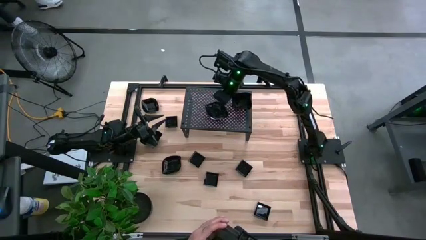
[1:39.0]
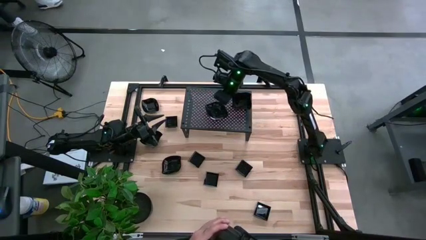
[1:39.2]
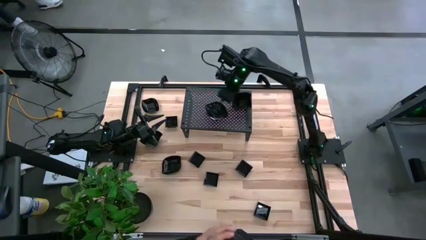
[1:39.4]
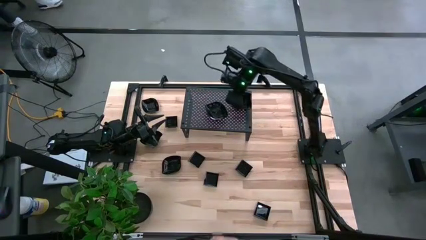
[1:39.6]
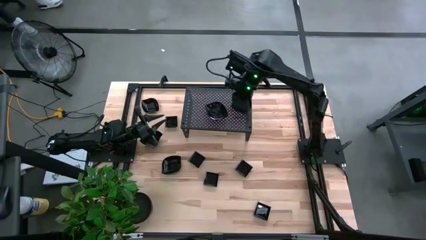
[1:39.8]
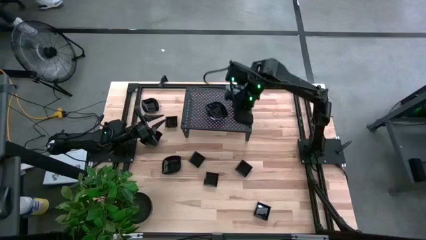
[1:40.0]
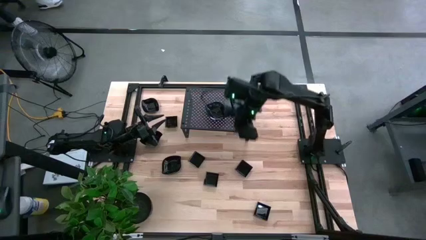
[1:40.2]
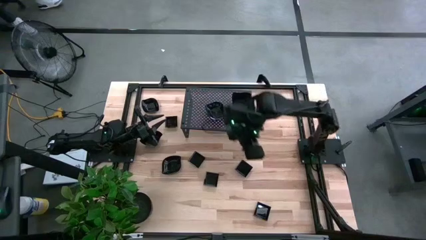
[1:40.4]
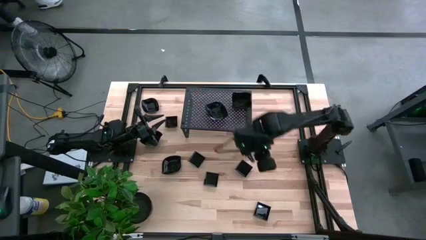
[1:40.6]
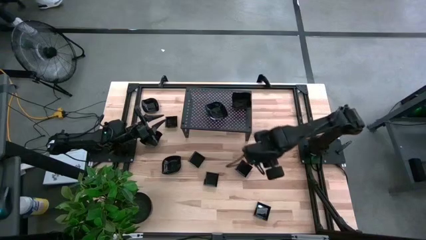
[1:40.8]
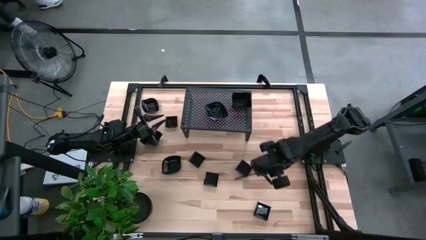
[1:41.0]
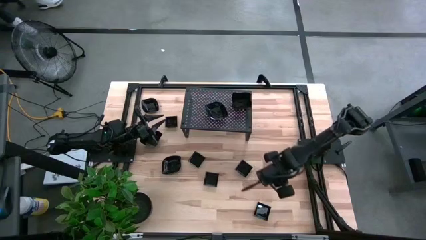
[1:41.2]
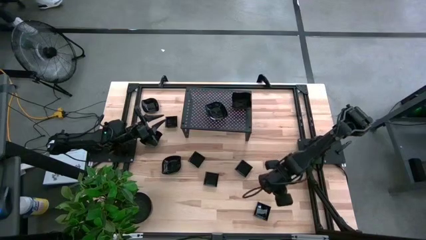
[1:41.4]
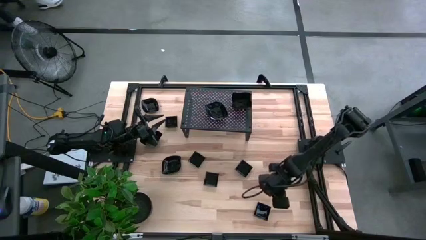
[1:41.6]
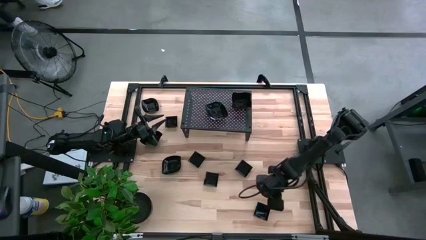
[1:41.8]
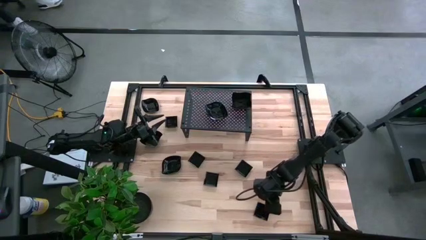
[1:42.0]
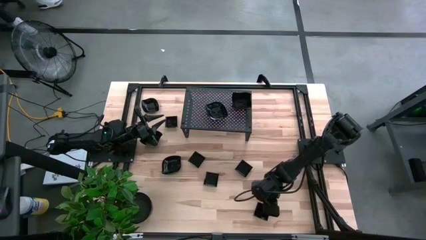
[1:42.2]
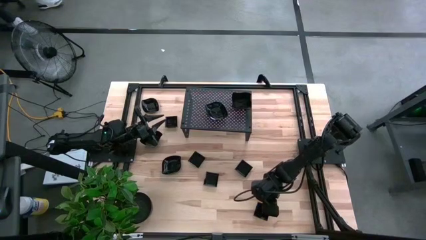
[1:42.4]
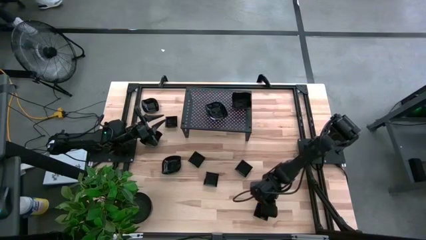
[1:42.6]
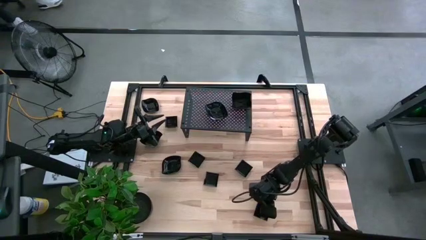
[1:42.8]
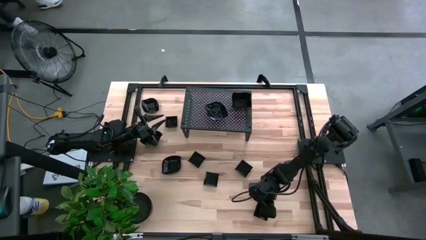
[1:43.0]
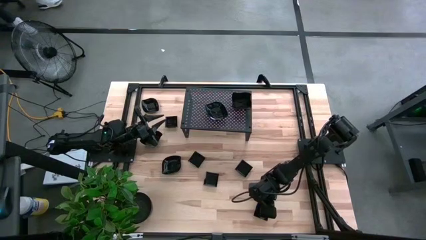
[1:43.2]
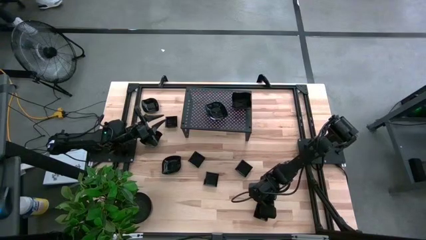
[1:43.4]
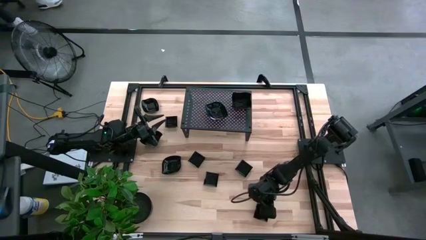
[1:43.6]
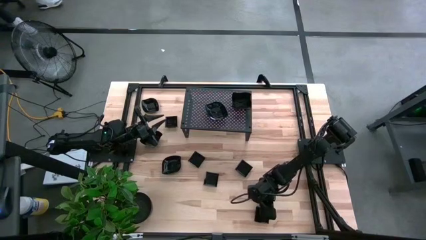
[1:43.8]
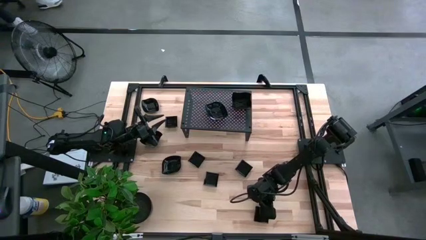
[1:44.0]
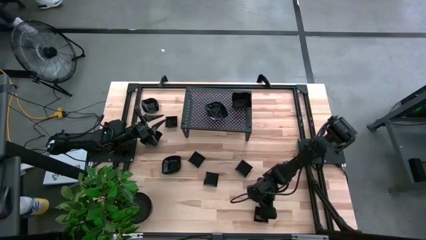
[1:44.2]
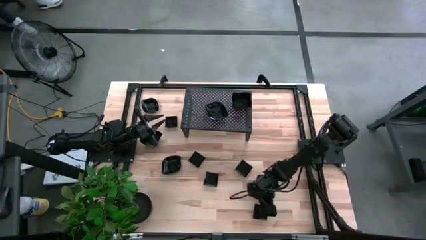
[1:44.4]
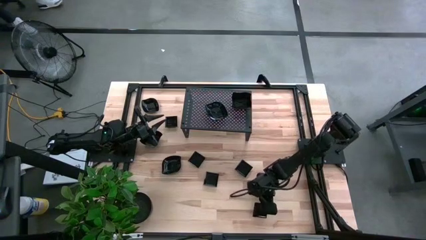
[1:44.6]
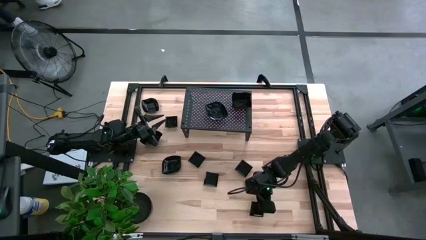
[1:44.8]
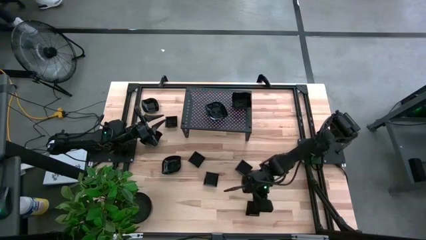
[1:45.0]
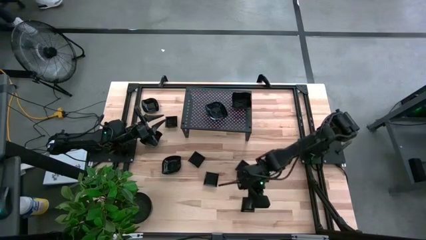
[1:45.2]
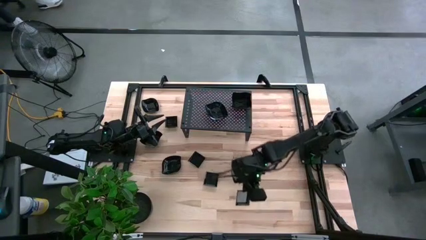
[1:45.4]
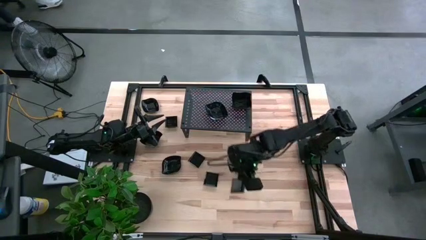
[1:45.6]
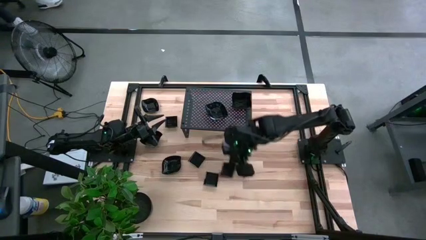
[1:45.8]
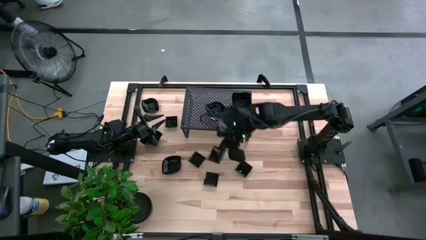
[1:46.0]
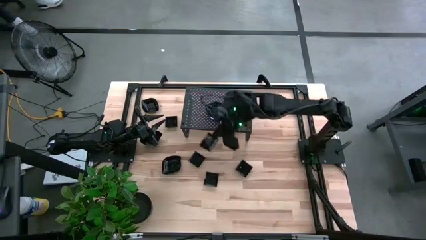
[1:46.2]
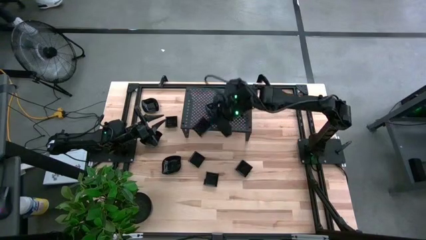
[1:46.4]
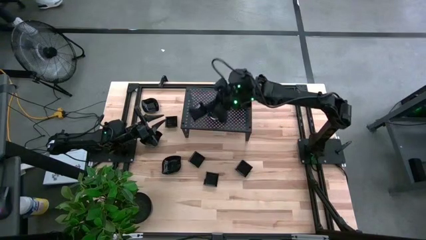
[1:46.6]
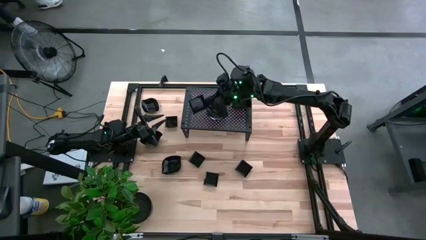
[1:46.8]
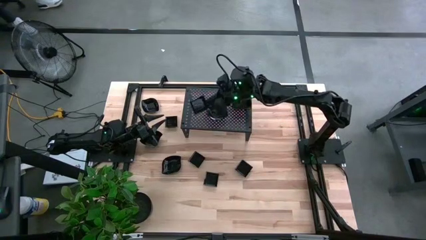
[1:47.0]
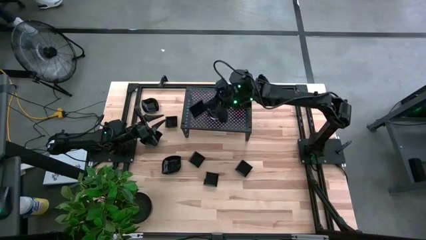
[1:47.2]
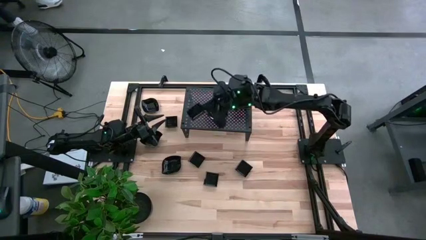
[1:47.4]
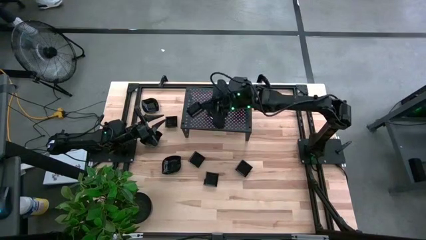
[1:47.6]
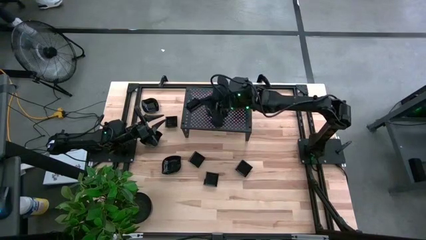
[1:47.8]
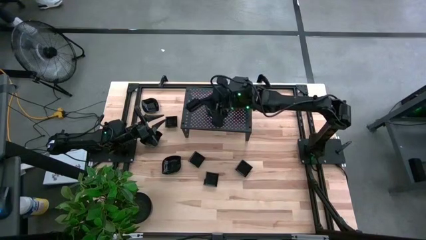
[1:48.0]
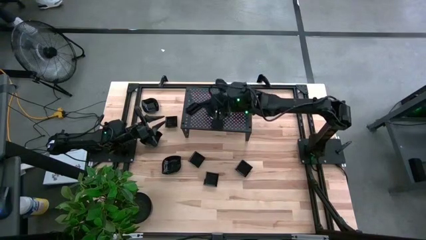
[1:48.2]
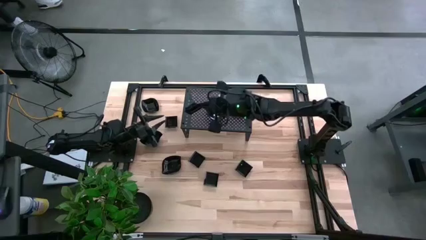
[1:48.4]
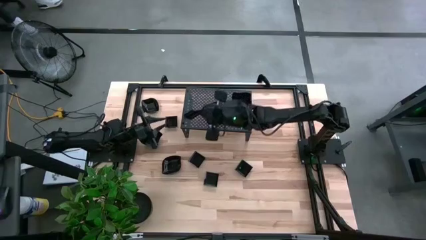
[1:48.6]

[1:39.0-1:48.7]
Task: Pick & Place Mini shaped plates
Put the square plate on the shelf

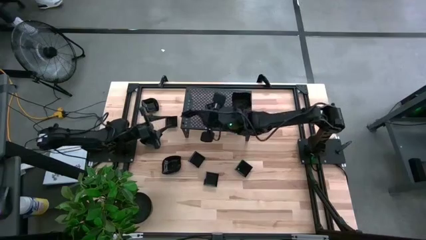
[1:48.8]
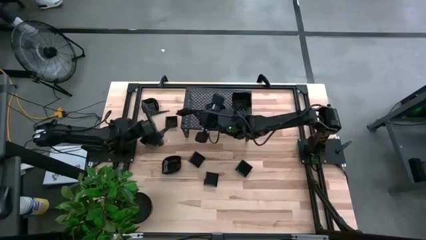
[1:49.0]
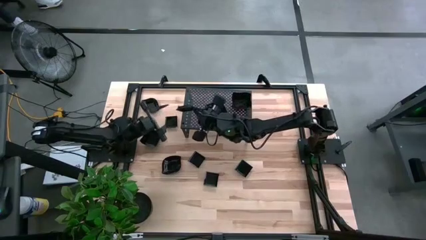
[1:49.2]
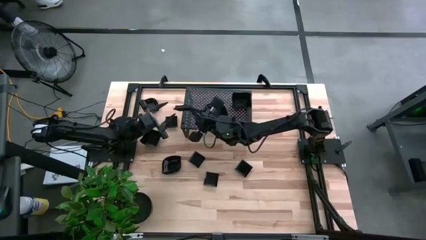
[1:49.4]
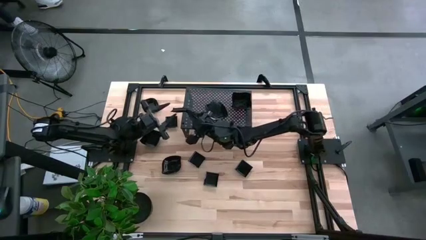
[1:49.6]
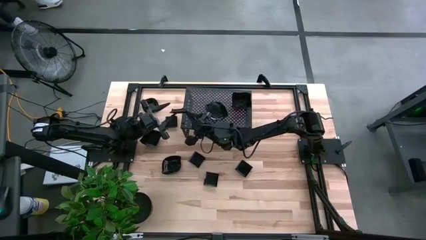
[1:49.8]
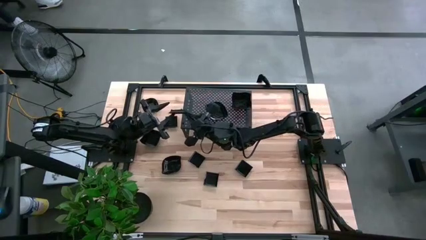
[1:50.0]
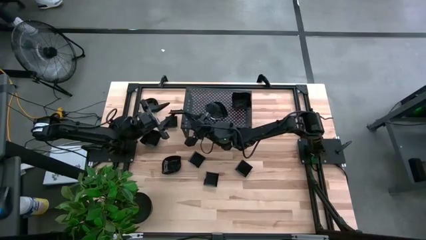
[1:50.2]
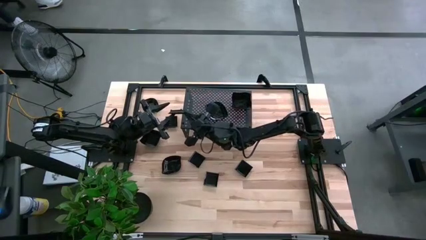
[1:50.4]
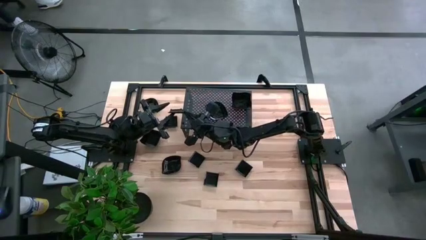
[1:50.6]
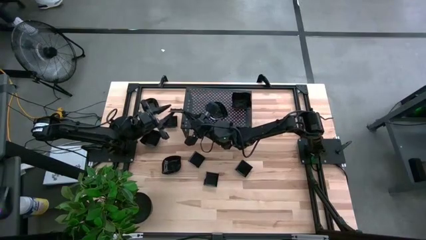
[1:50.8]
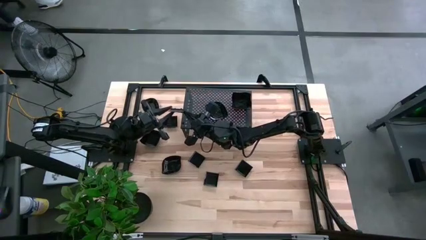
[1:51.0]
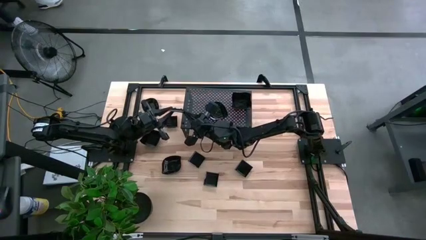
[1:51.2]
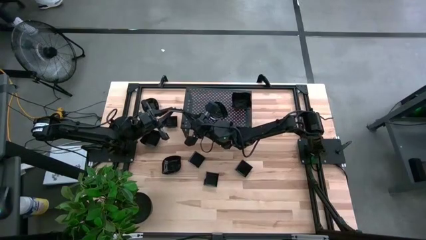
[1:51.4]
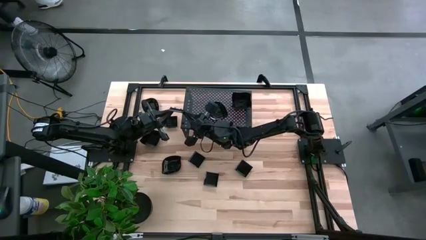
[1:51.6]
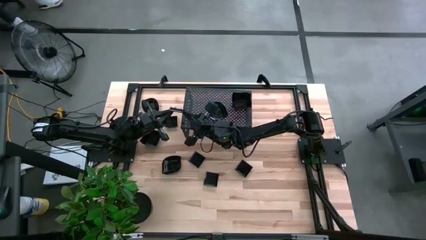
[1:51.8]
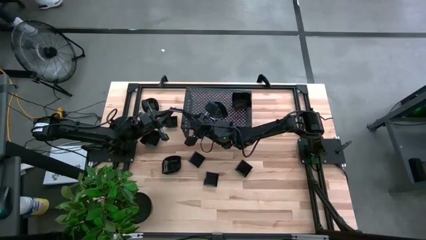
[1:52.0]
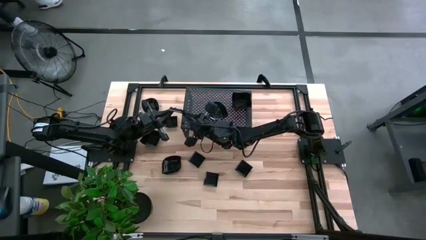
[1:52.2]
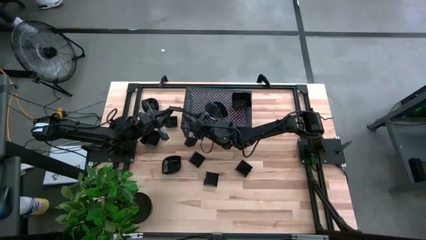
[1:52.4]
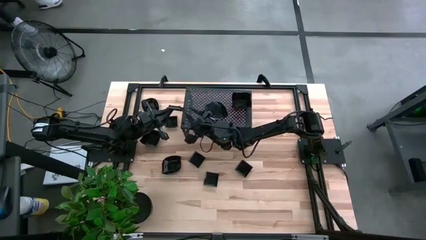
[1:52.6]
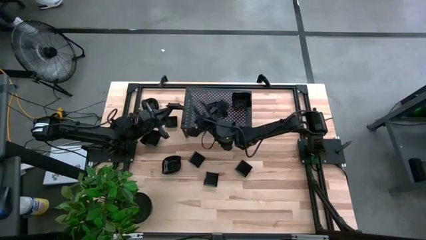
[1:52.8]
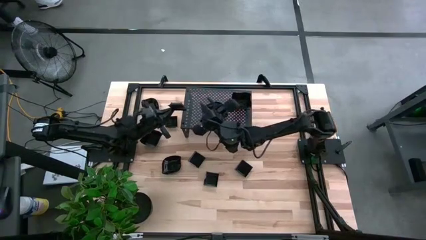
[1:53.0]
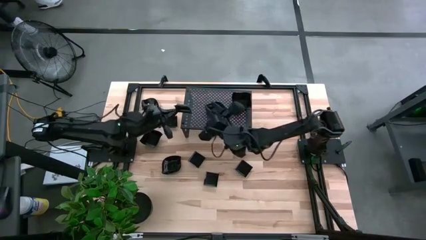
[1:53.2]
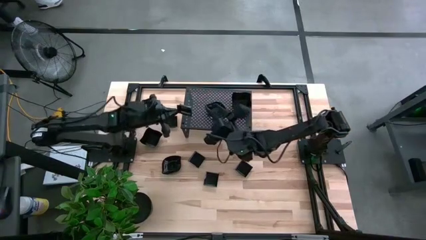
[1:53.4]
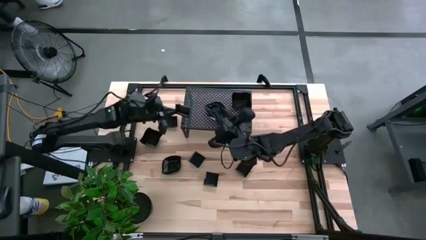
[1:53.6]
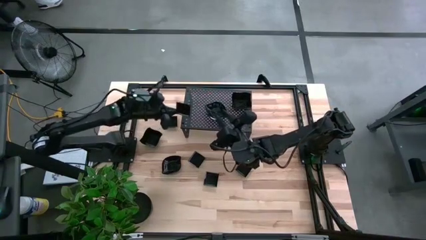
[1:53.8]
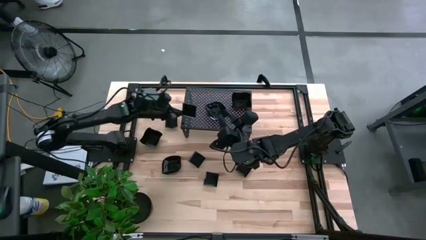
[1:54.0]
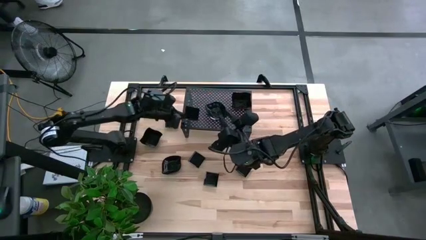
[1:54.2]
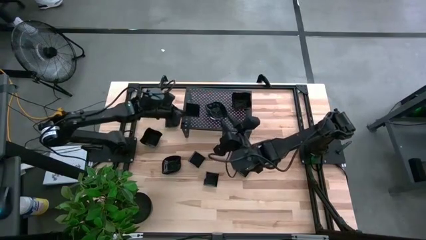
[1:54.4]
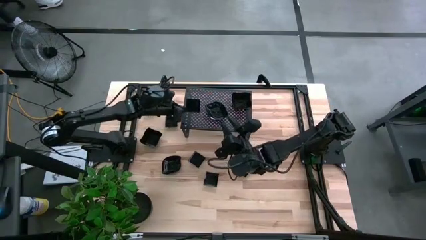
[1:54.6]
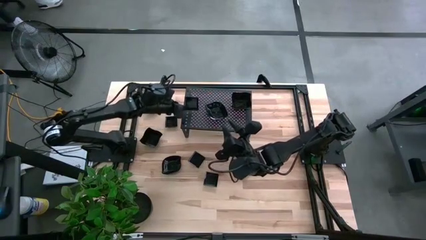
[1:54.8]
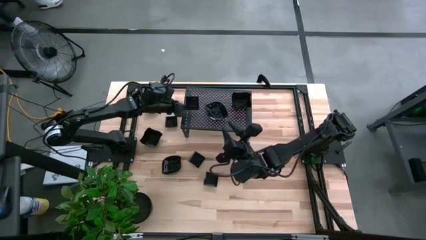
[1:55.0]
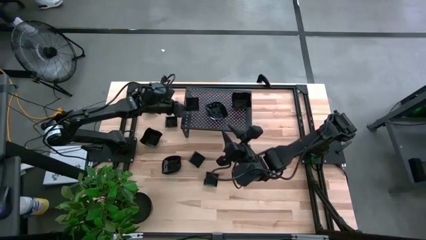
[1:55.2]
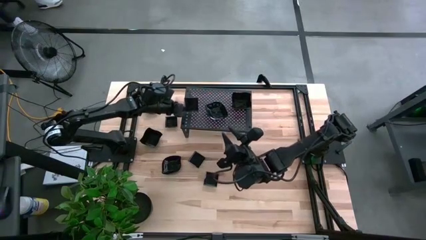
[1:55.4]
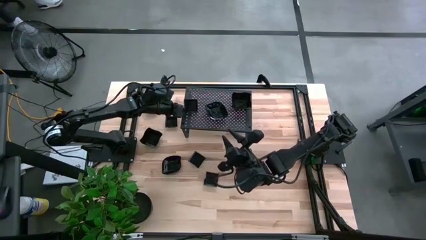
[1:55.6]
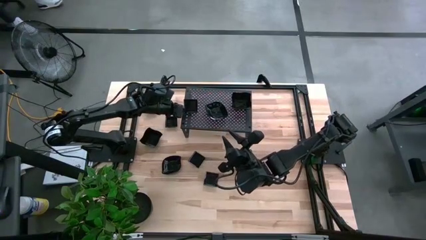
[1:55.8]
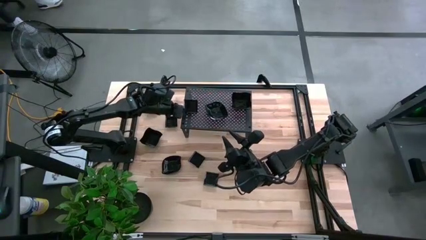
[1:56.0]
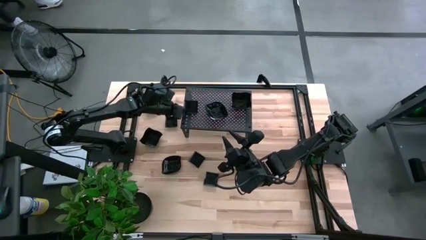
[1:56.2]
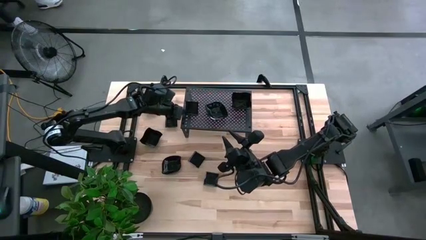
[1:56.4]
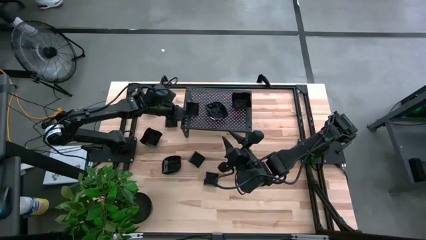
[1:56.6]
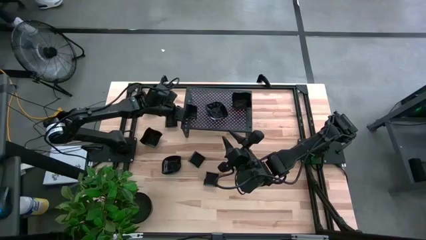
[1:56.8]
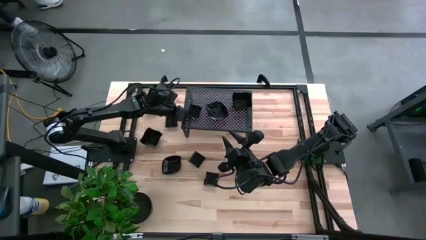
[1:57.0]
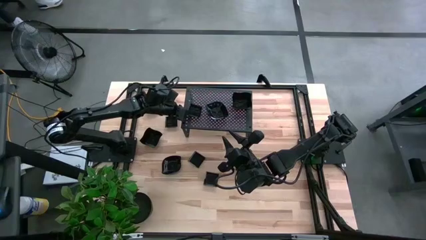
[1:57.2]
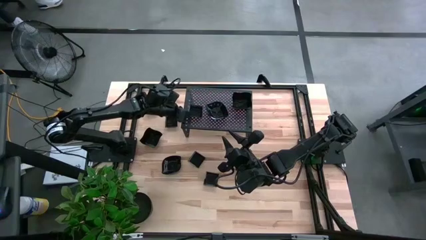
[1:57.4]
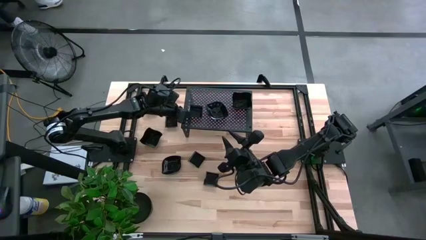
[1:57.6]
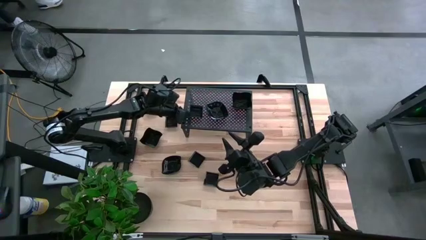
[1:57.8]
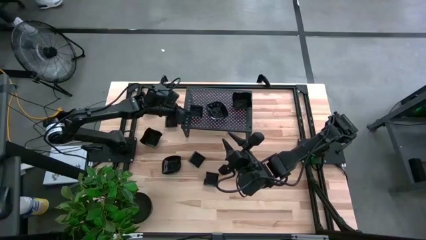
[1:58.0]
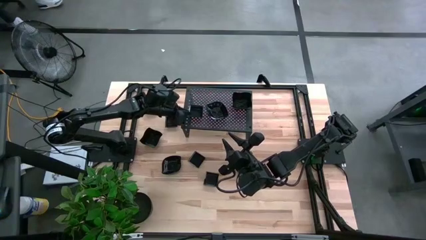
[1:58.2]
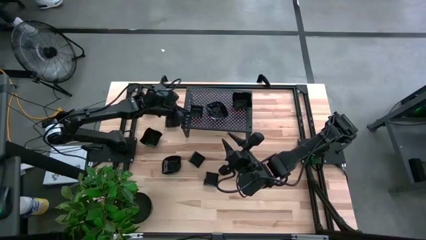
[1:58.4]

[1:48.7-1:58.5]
Put the square plate on the shelf
